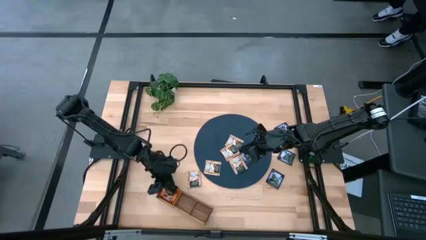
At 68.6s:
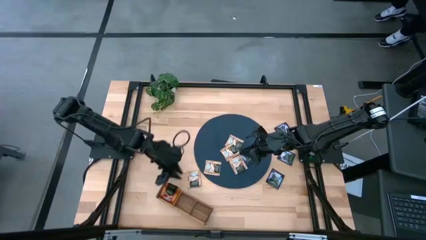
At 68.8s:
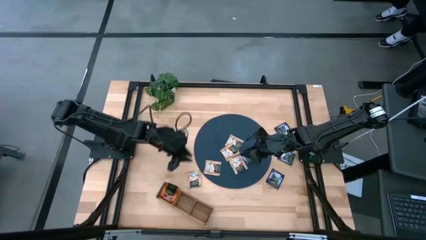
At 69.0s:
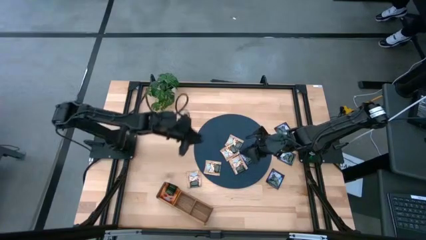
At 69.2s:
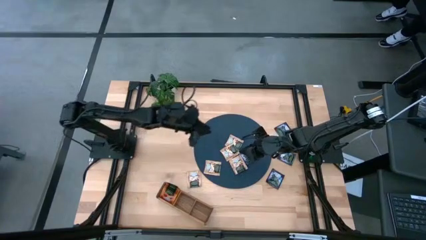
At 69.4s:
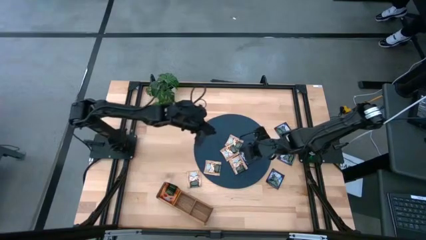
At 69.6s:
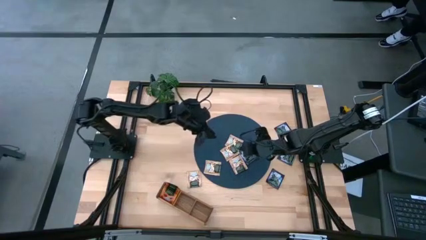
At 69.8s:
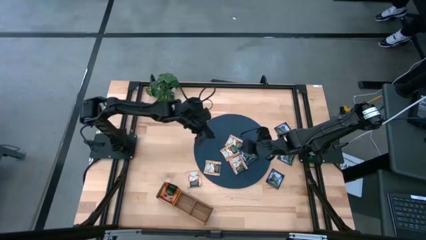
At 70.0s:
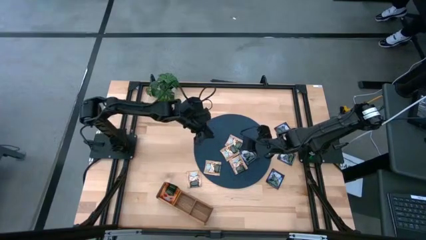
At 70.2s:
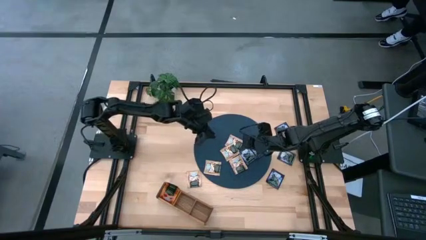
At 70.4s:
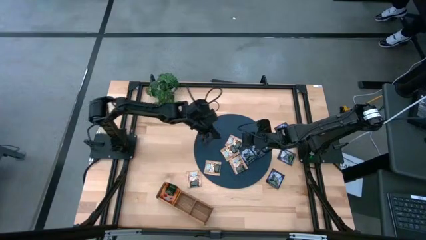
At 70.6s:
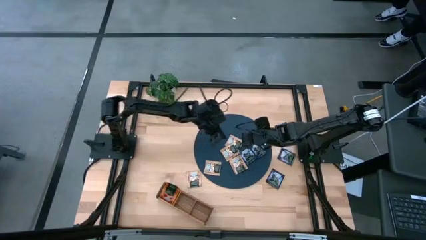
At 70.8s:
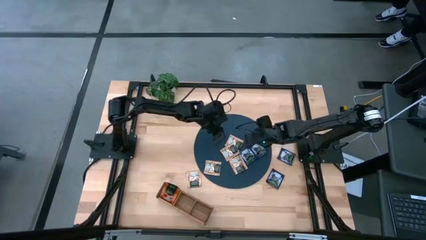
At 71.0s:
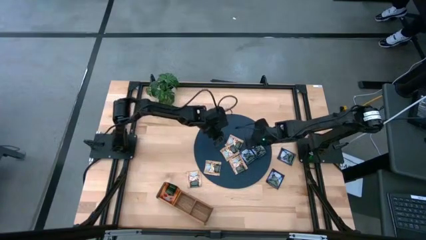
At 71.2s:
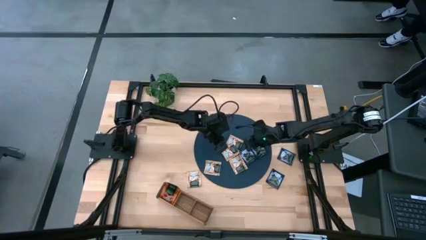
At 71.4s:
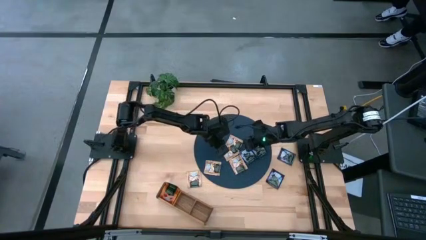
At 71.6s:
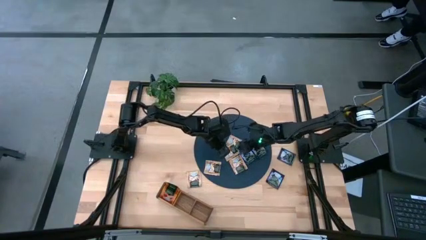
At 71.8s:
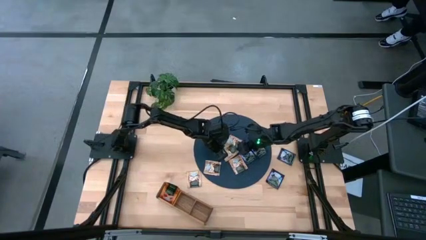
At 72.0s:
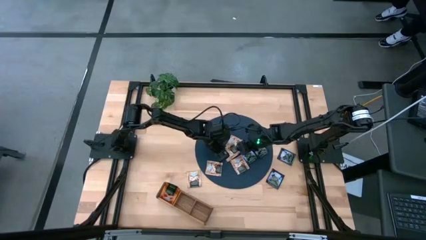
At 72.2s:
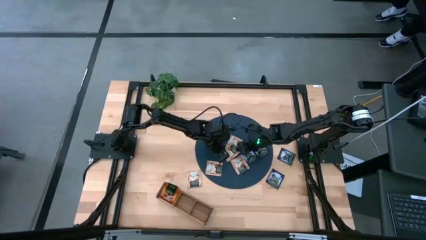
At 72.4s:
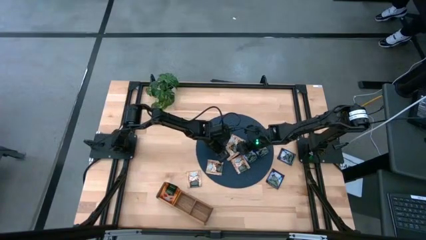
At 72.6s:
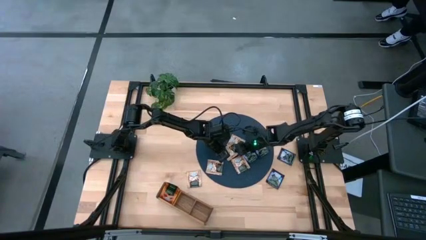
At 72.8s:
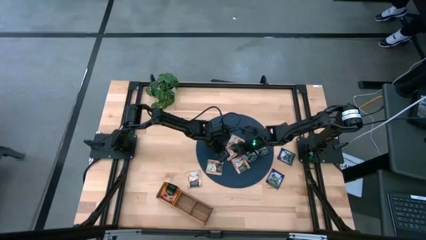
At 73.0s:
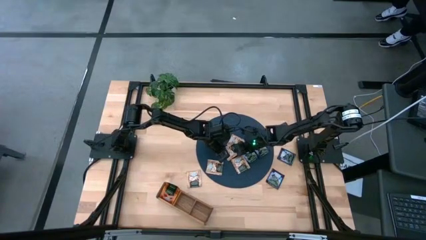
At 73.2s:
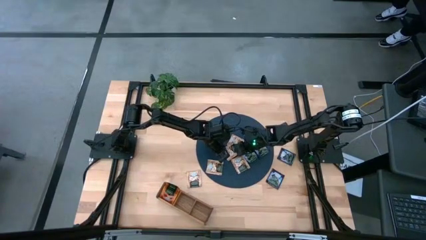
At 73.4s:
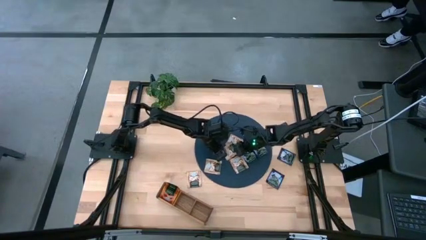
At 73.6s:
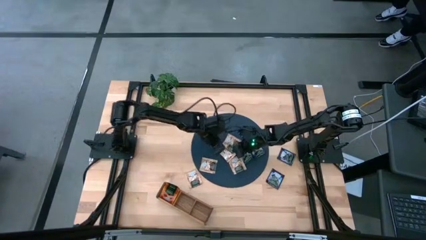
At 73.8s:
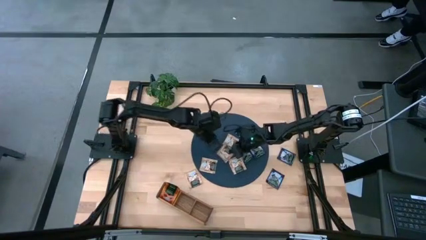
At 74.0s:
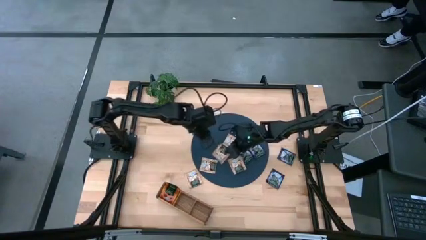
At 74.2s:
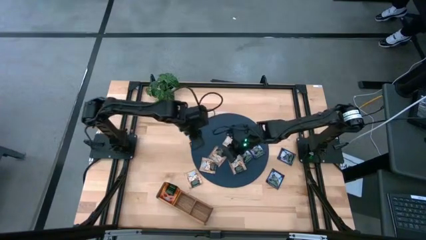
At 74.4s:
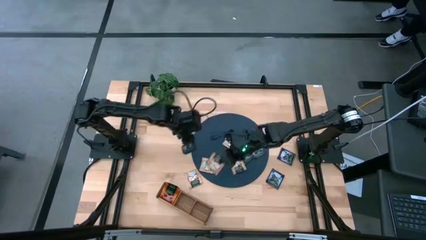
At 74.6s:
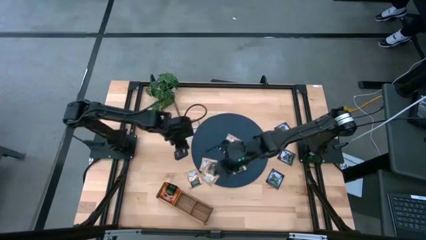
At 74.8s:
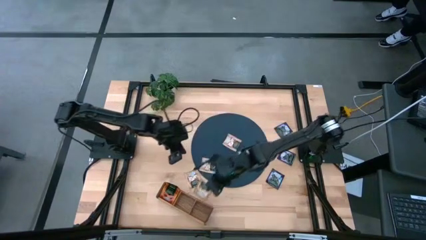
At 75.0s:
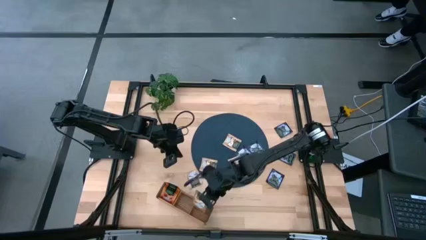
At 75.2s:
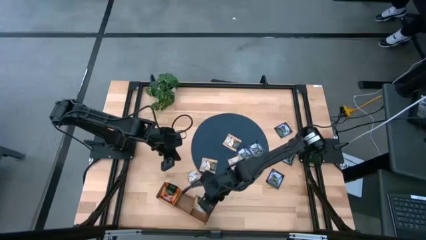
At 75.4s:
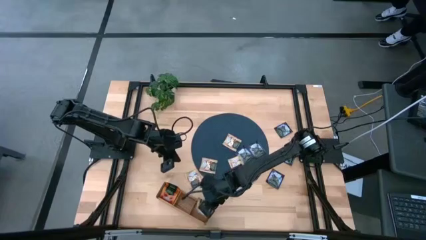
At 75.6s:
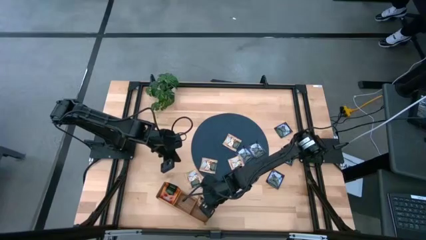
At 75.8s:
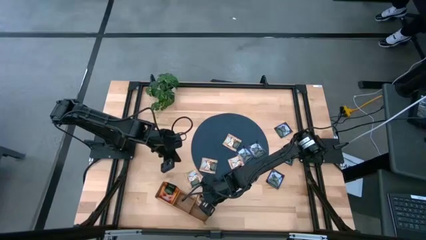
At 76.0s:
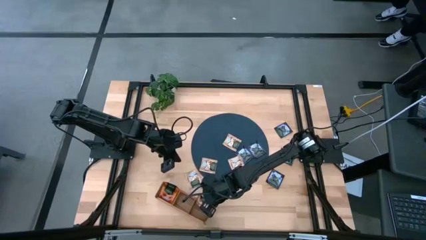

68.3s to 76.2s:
Task: Pick & Place Tea
Put the brown tea bag into the right section of the wooden organizer

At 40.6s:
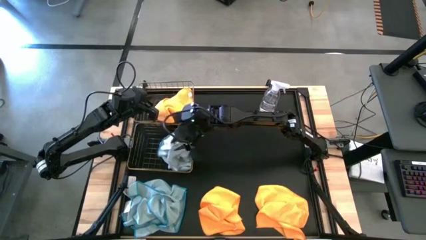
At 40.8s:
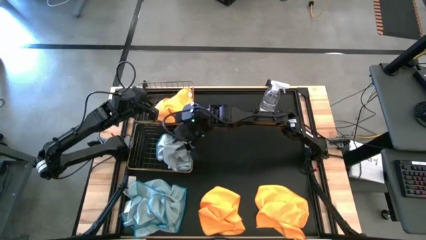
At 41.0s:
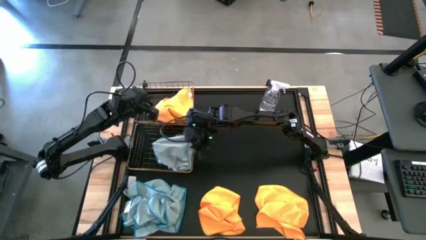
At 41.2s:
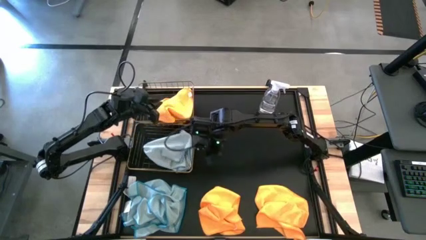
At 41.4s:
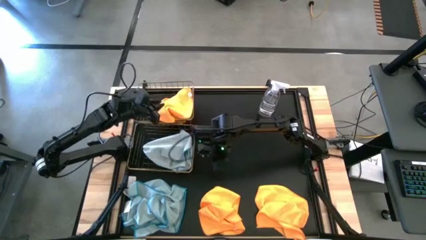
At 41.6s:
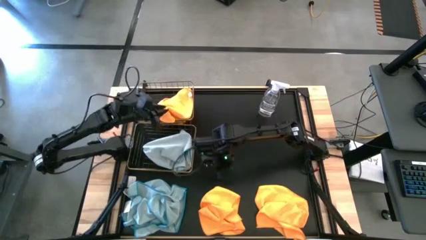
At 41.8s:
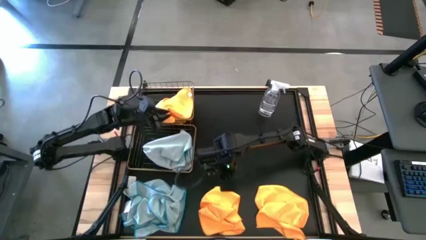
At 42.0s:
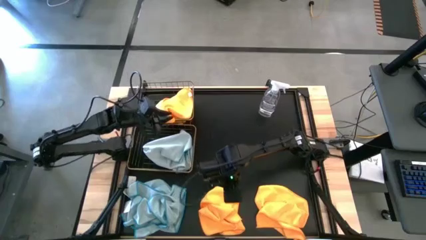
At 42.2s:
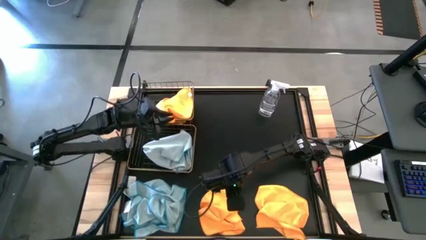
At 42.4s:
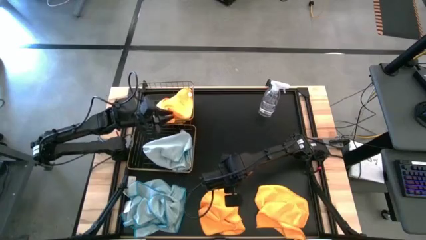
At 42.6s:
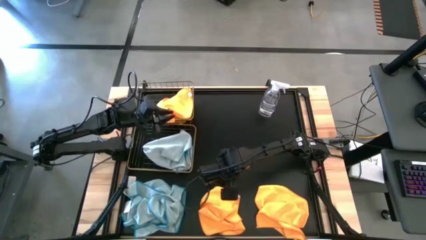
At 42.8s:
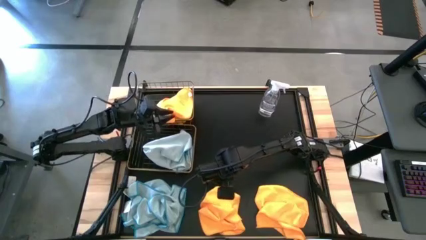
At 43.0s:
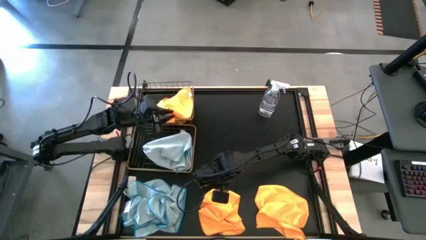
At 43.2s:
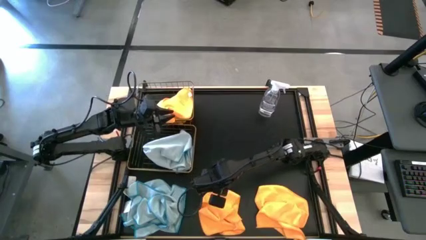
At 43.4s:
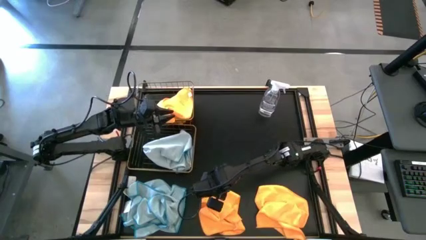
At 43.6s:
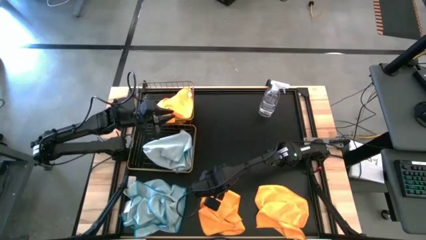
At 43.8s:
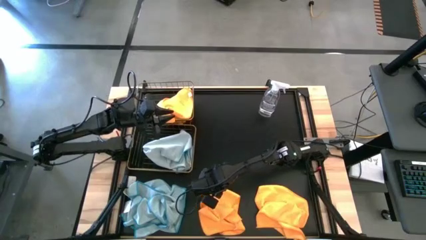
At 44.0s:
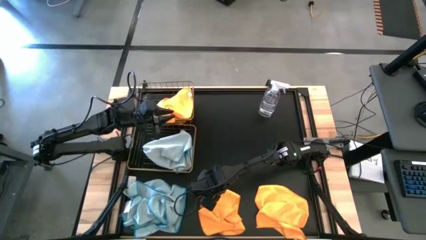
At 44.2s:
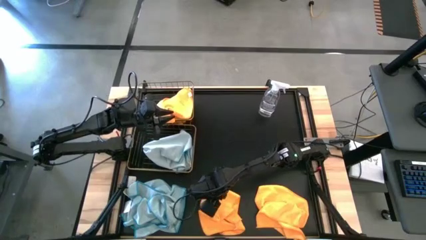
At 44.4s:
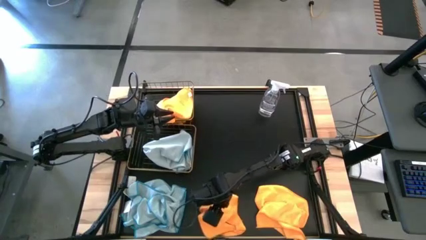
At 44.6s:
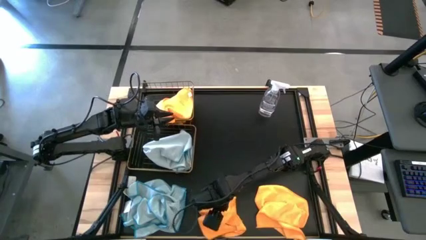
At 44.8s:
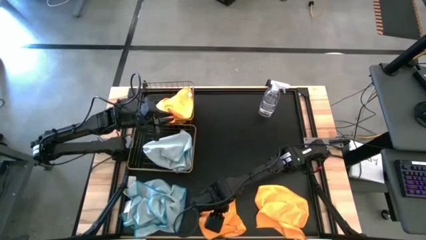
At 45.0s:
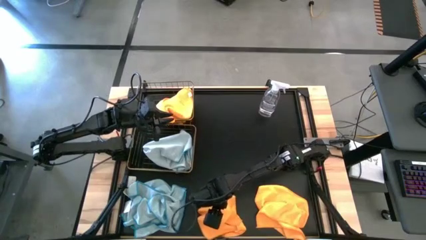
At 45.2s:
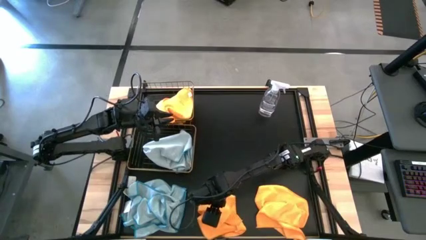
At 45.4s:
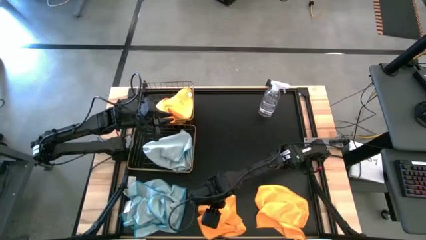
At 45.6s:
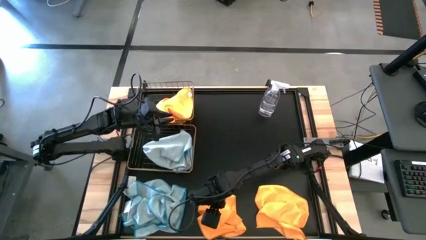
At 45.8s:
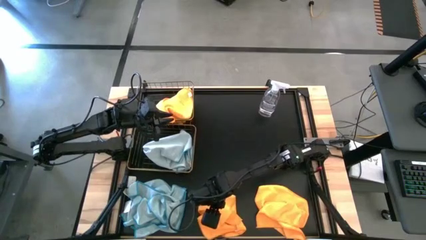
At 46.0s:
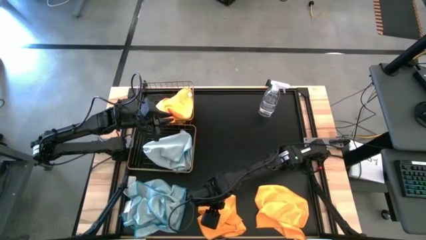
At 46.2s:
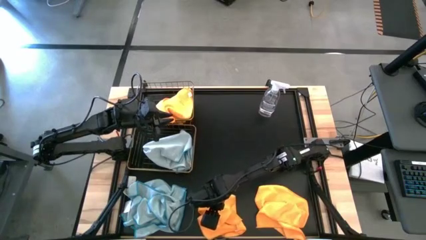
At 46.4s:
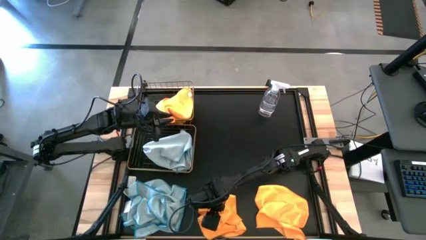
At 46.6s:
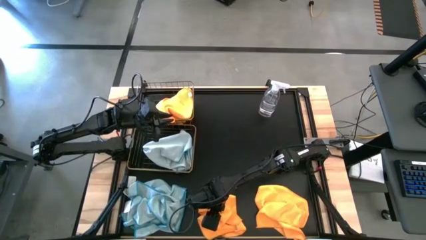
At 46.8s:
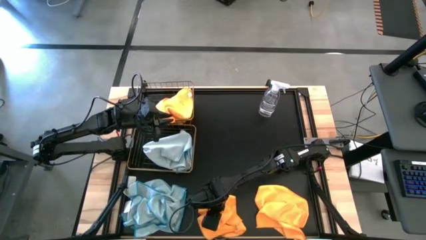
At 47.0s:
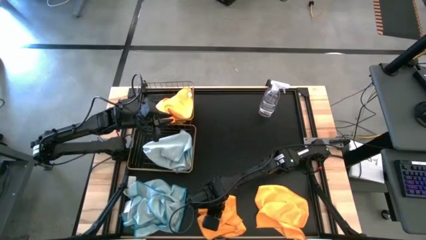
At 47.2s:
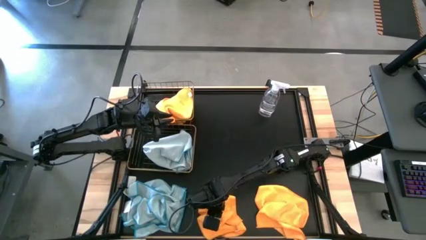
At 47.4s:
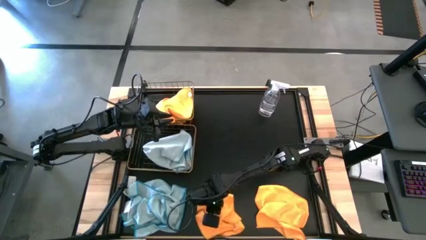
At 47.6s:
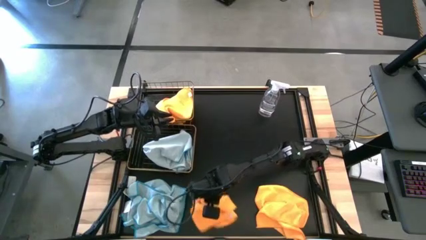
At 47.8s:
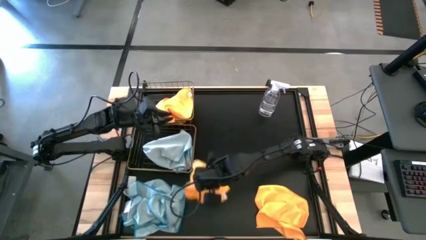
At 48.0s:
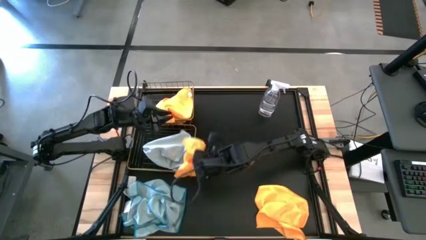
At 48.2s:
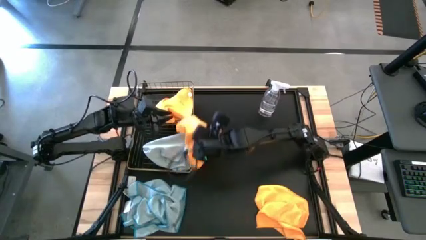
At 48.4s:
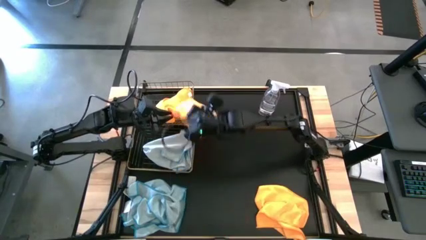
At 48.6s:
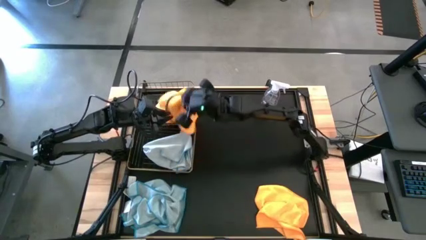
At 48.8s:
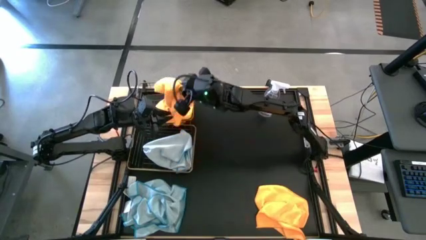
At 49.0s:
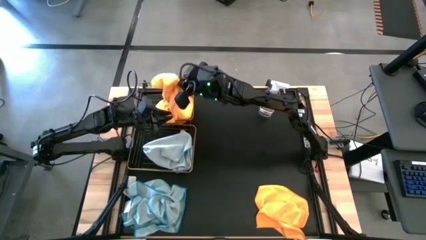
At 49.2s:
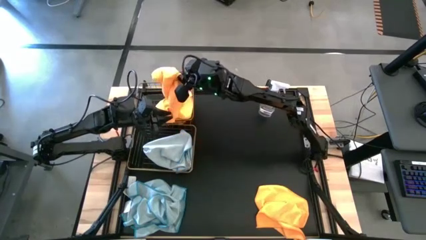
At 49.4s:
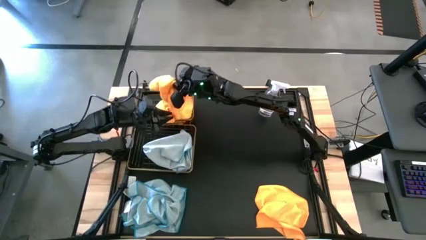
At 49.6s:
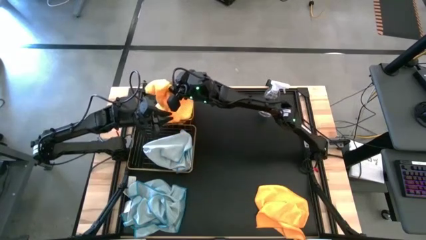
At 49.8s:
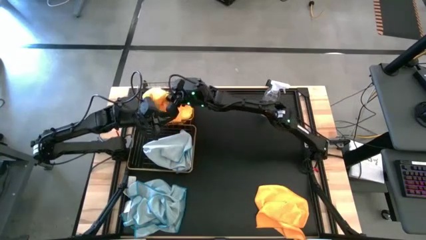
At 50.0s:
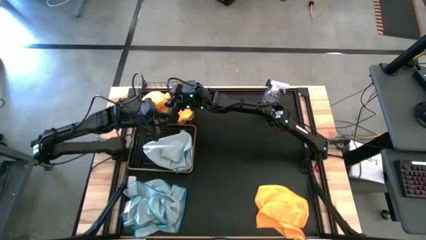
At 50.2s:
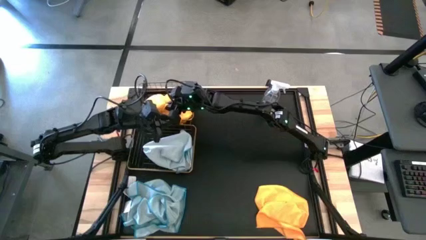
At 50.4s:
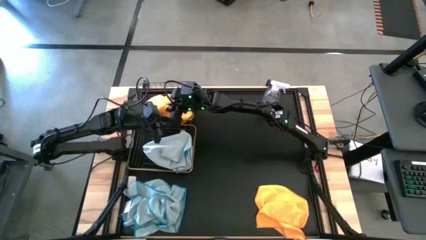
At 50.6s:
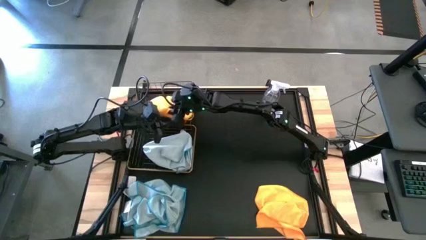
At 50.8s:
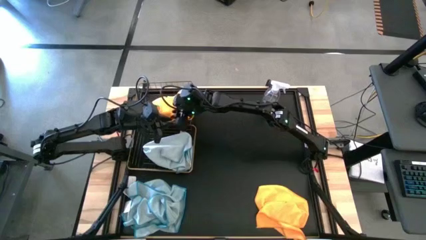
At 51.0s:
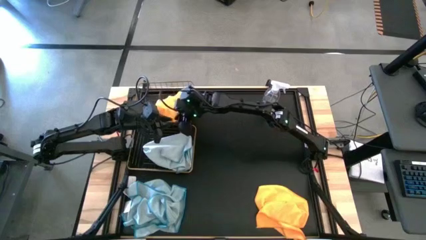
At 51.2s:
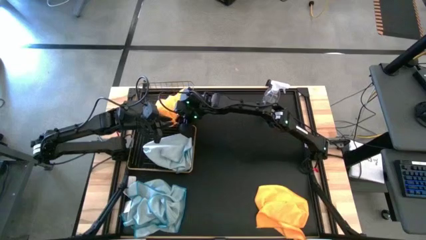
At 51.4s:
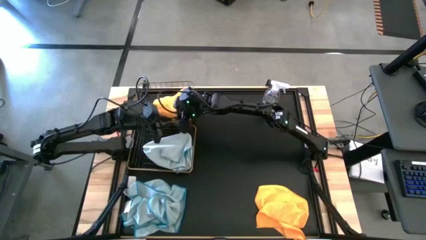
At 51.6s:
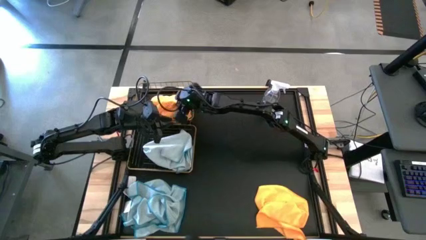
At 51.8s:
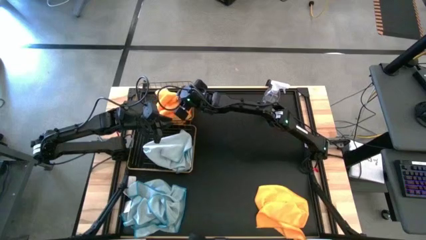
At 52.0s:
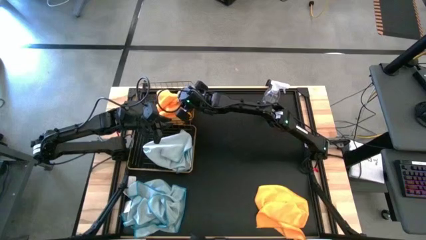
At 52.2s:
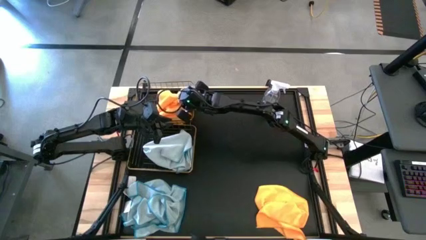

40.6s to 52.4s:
Task: Sort microfiber towel by color & place in baskets
Put the yellow towel into the top wire basket
